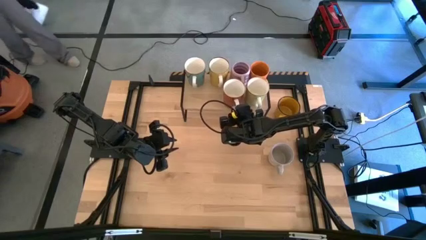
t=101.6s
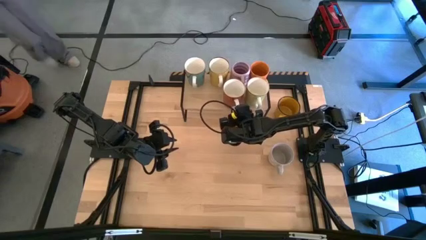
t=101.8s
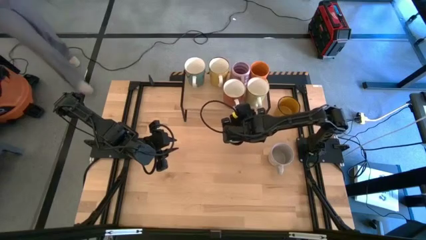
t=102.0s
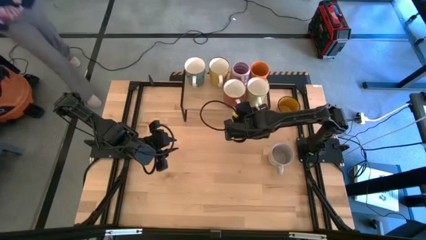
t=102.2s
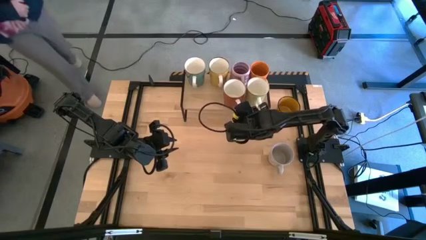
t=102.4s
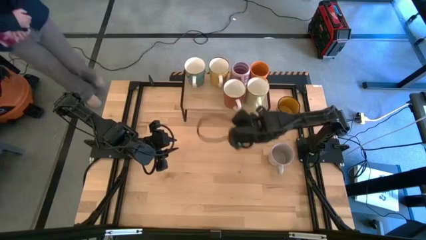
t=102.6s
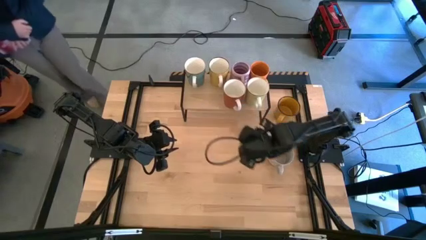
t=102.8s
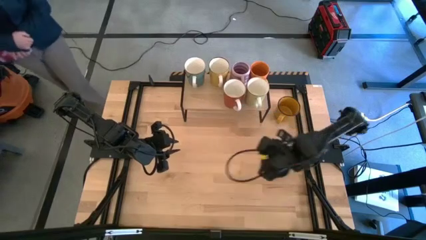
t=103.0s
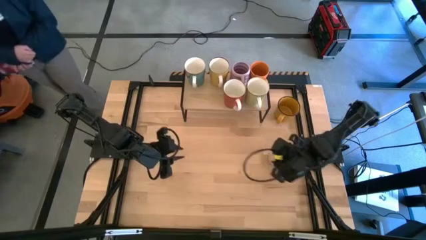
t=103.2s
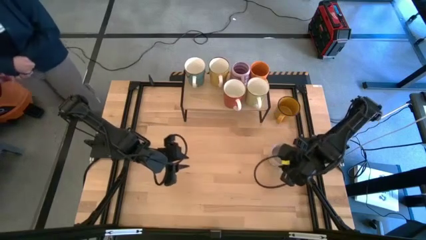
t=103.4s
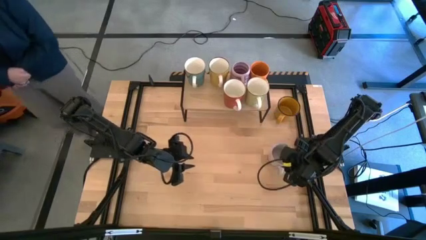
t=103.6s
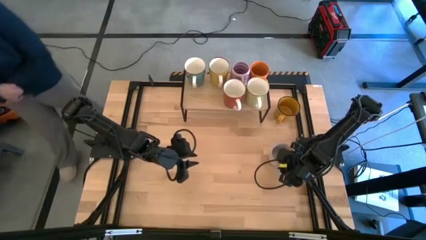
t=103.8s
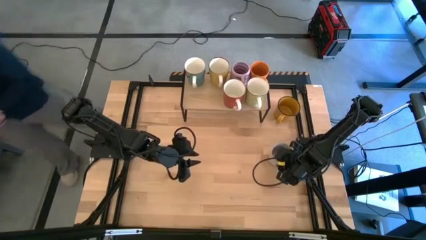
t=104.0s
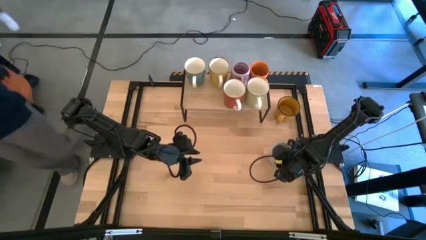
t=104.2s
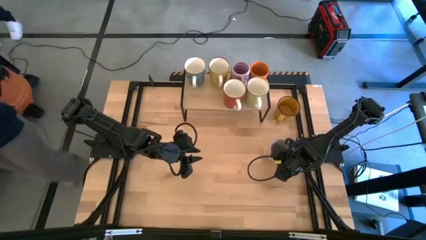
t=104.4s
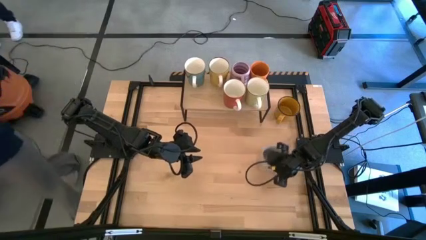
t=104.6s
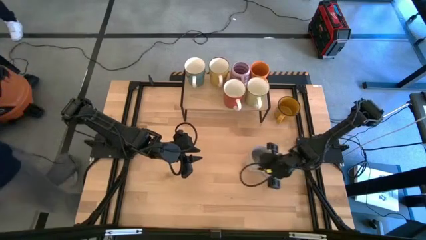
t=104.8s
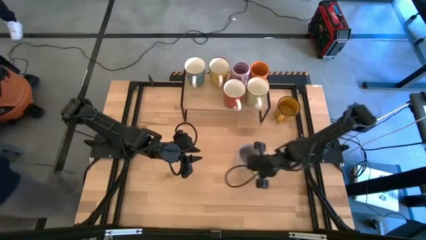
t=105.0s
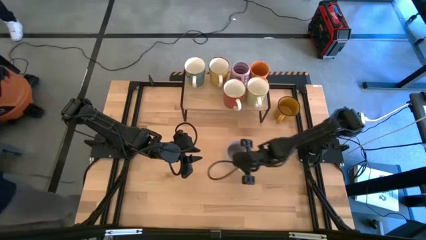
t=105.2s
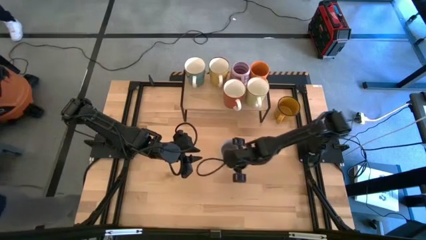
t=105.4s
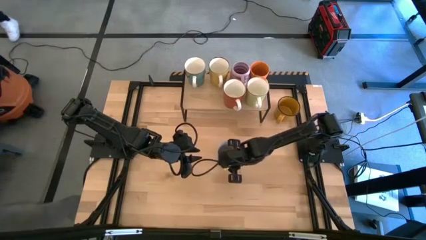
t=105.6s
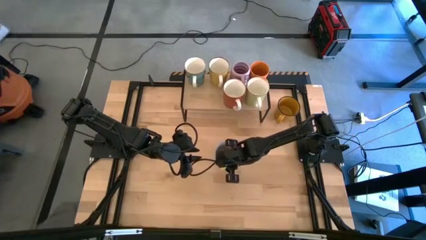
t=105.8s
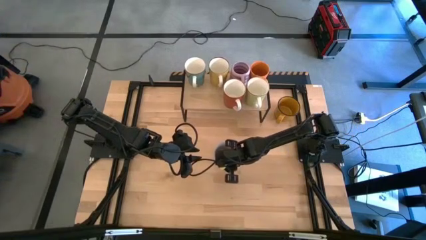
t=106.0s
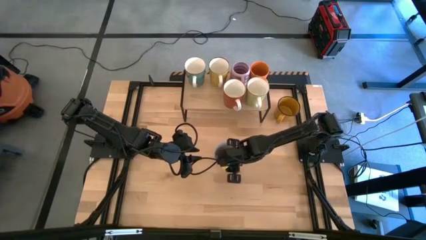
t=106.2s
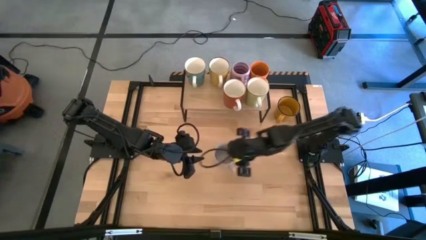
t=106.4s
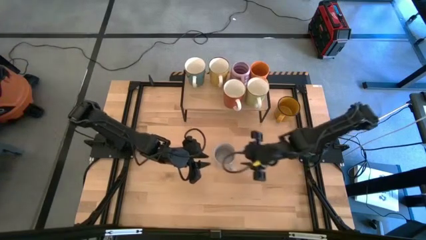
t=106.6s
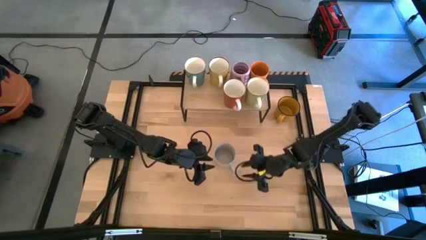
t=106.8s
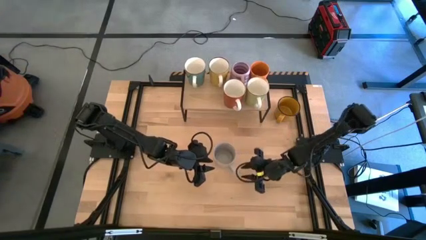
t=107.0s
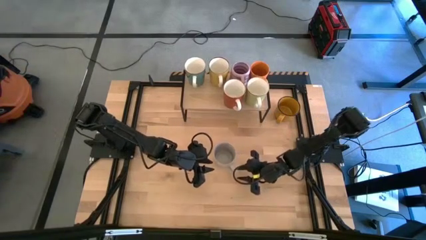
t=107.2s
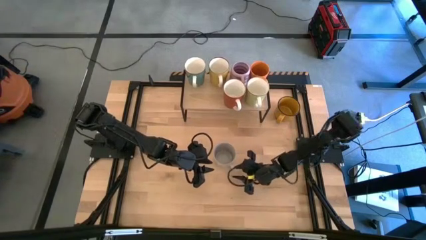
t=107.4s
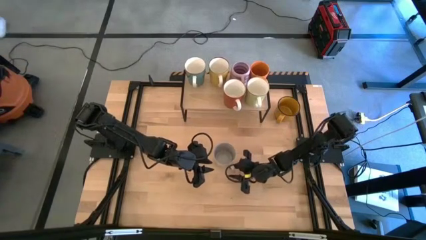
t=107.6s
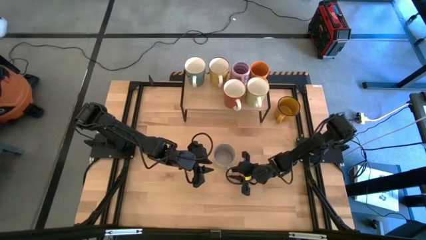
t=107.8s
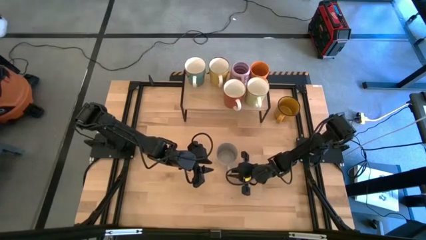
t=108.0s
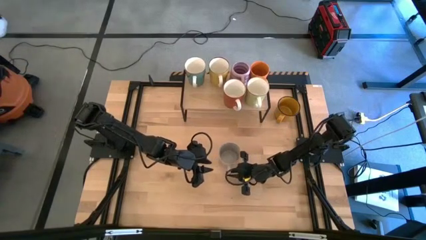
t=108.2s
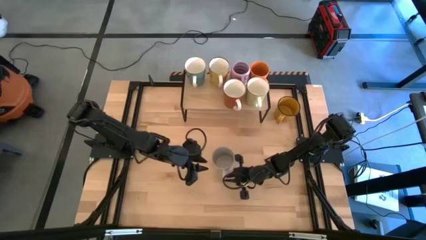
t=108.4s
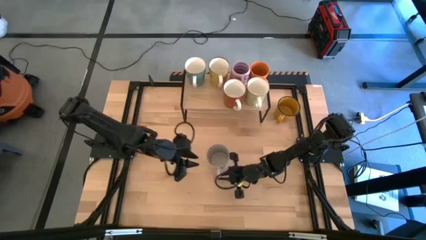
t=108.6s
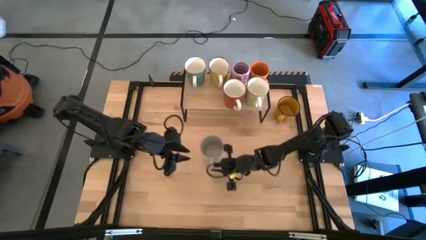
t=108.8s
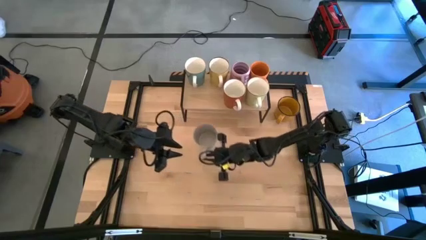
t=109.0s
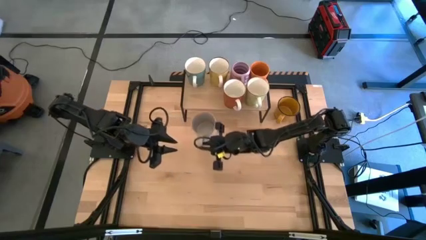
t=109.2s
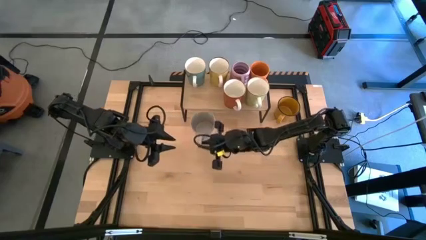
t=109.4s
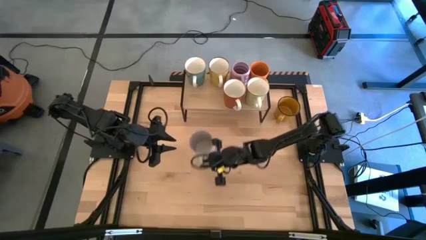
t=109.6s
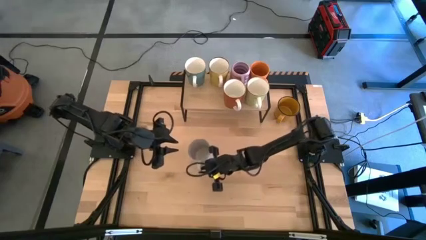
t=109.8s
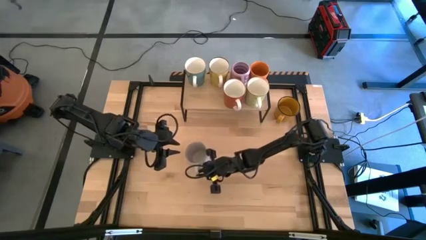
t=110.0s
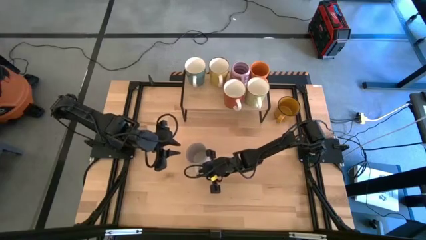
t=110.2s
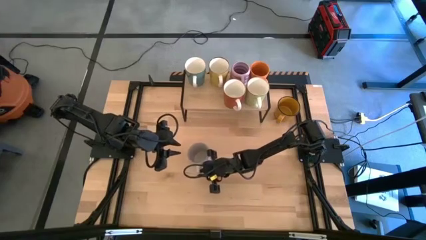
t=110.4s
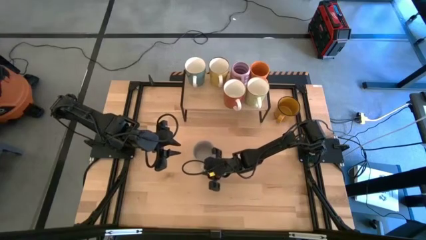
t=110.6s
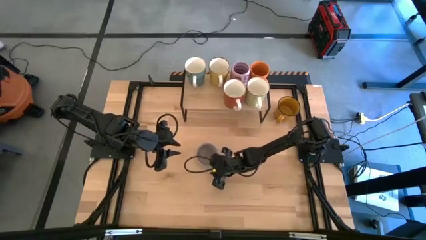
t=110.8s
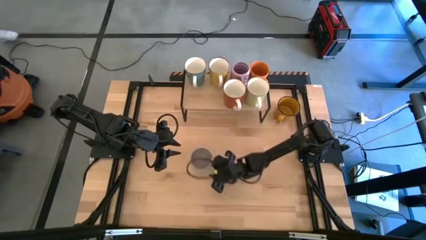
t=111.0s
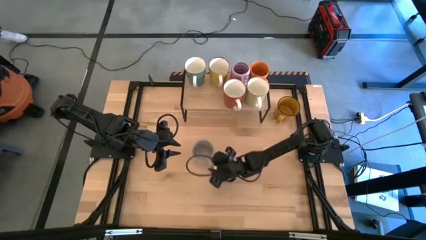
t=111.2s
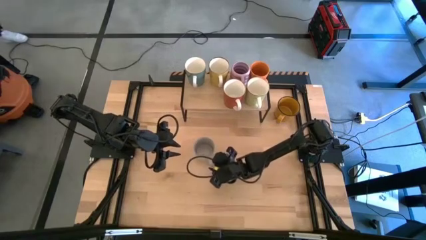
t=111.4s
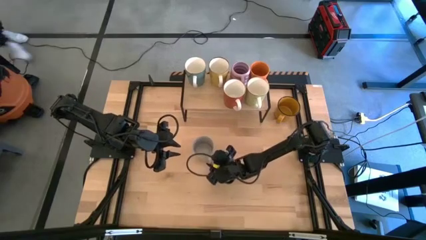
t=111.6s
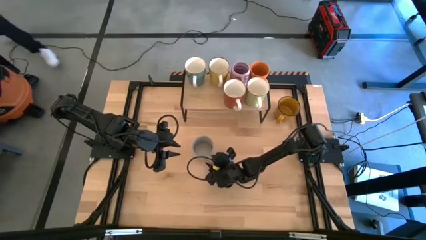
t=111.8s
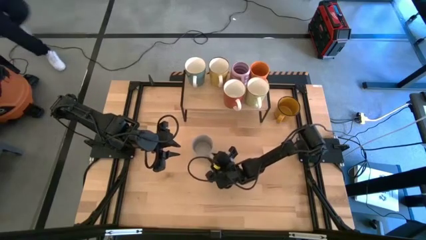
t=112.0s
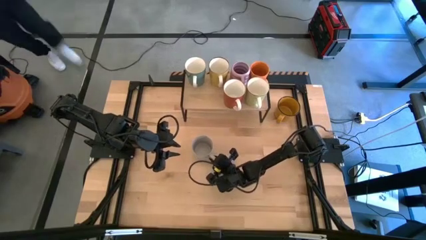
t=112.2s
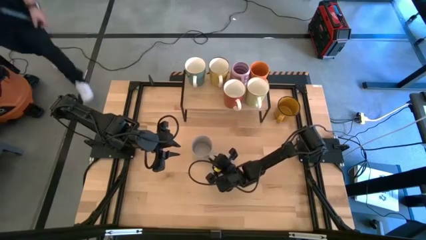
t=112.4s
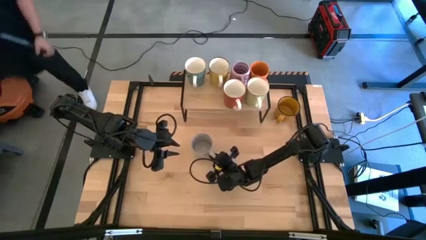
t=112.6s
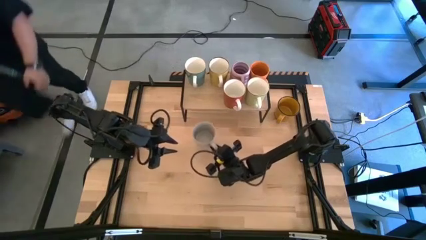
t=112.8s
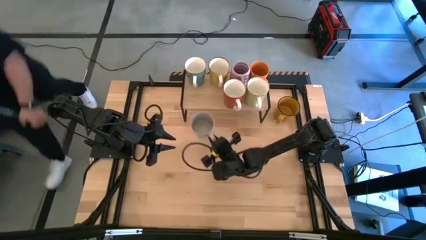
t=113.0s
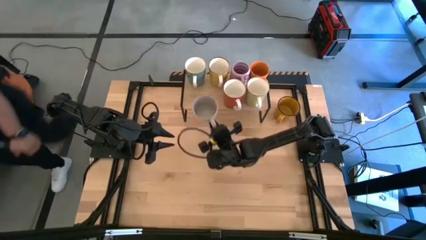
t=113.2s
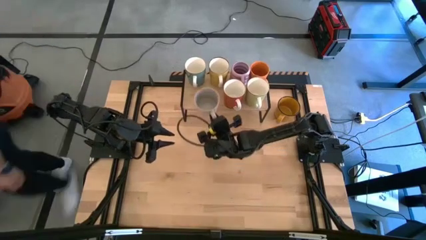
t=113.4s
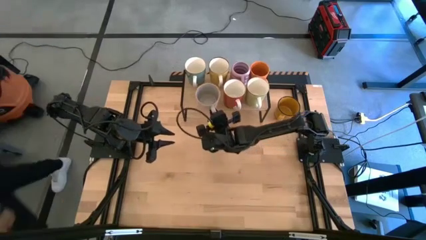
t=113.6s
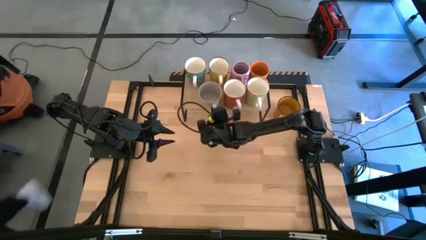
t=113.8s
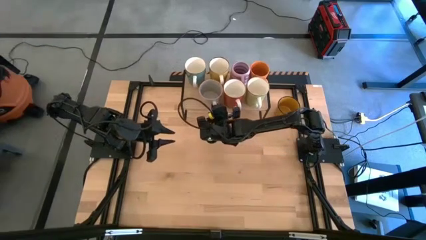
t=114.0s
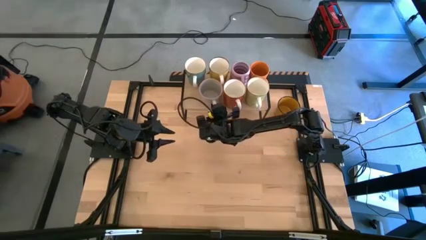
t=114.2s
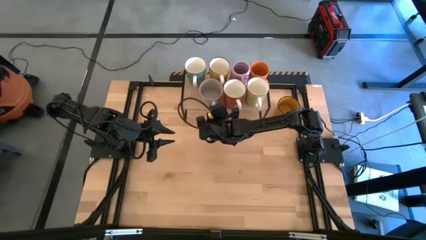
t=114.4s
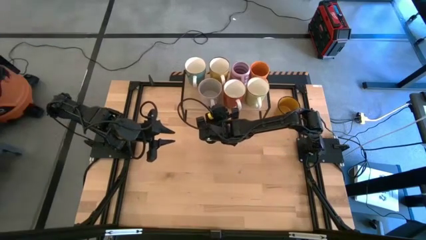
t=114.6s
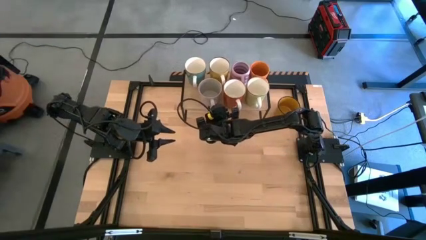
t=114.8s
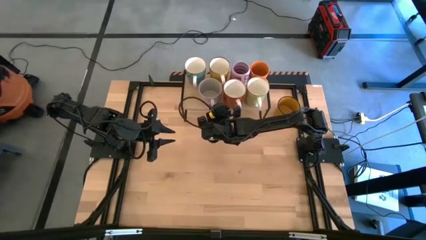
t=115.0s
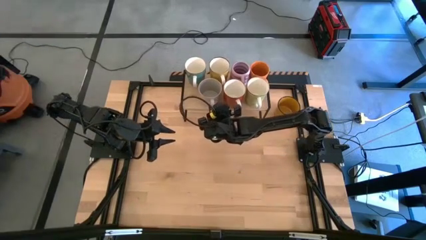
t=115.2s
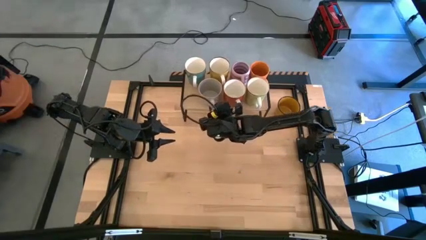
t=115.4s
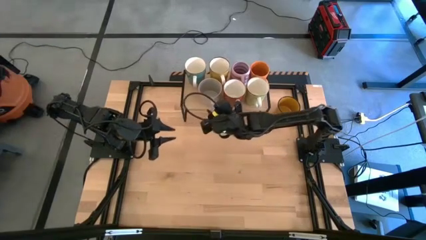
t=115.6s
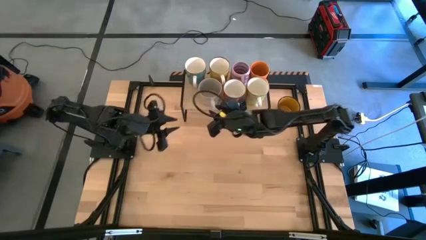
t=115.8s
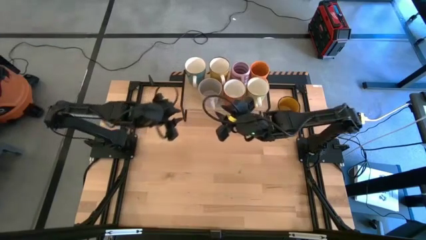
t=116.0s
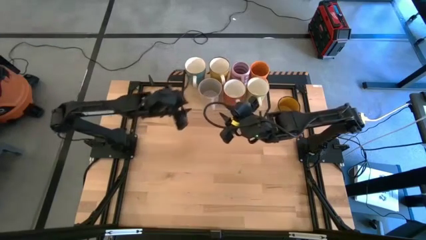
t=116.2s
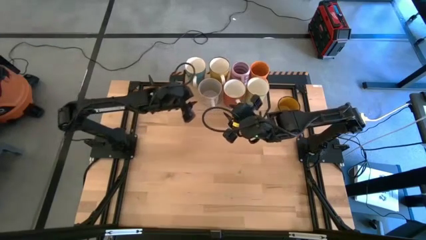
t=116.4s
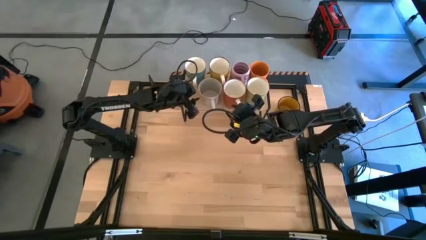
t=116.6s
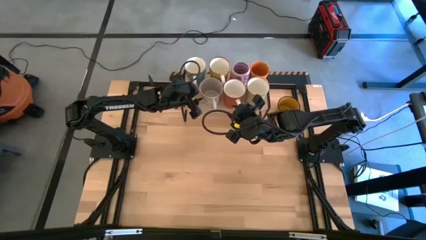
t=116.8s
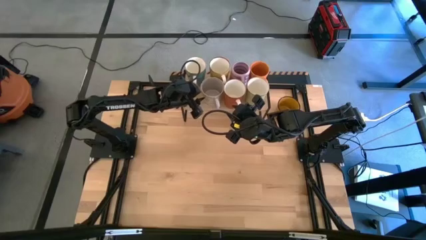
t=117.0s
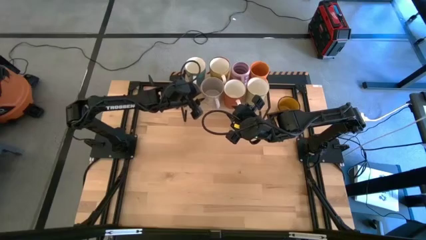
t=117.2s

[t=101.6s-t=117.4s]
Task: Place coffee mugs
Put the gray mug on the shelf

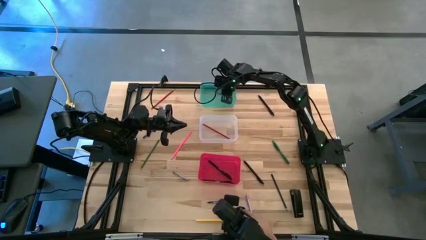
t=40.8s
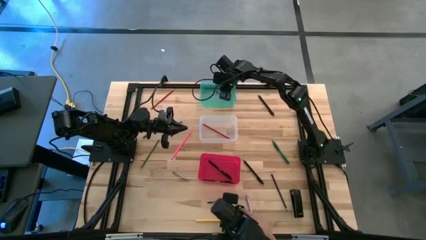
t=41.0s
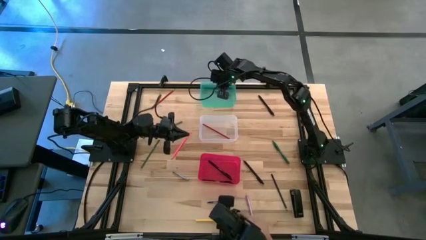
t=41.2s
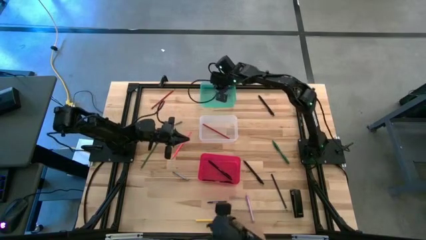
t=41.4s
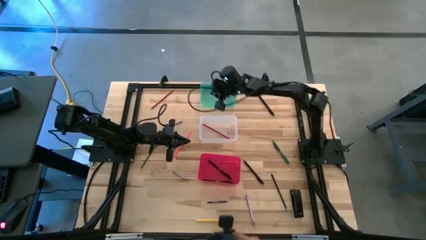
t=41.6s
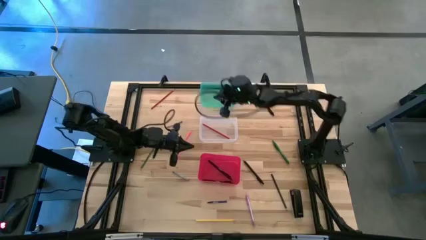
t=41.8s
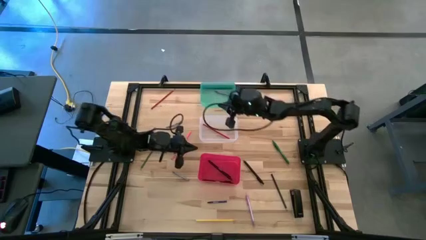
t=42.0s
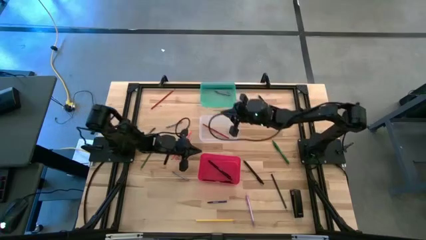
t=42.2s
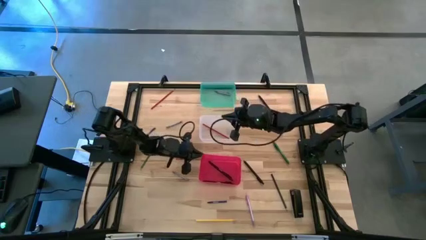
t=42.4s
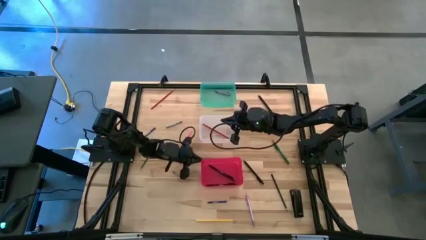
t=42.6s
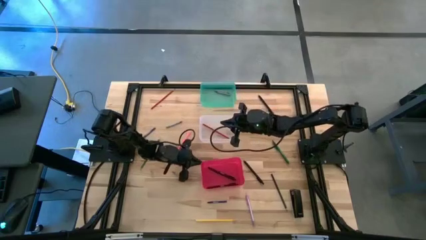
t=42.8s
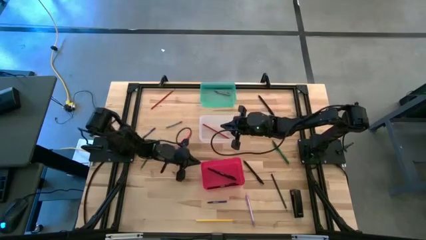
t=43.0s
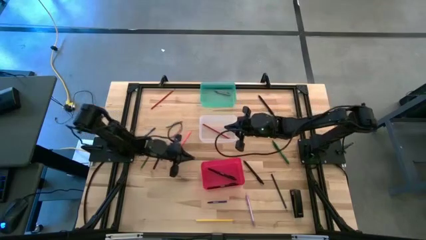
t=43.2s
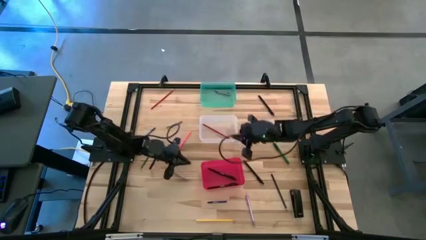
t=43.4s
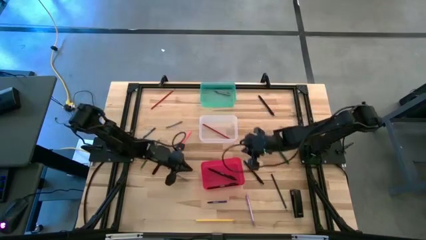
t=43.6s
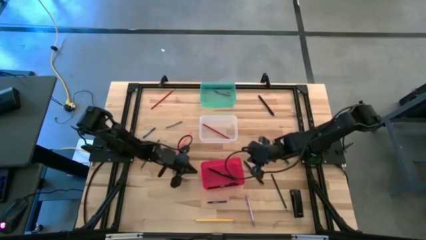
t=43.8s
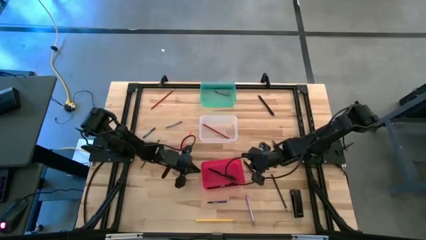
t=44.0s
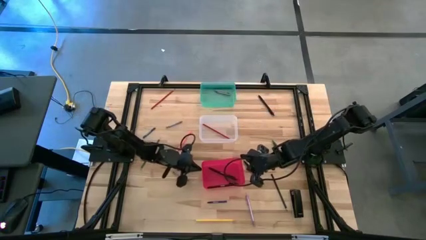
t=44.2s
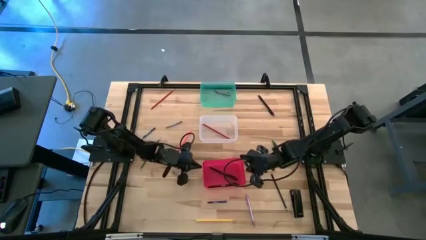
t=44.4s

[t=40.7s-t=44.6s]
Task: Sort crayons/erasers/pens/pencils in bins
Adjust the red bin
